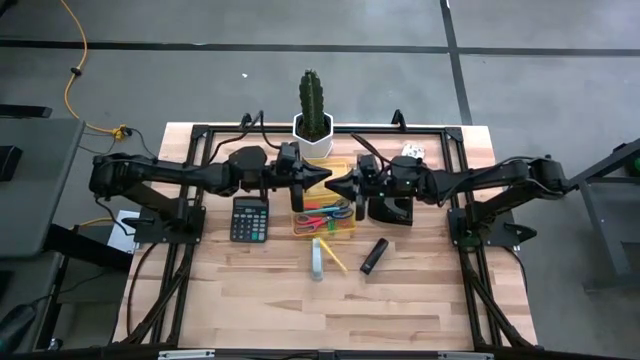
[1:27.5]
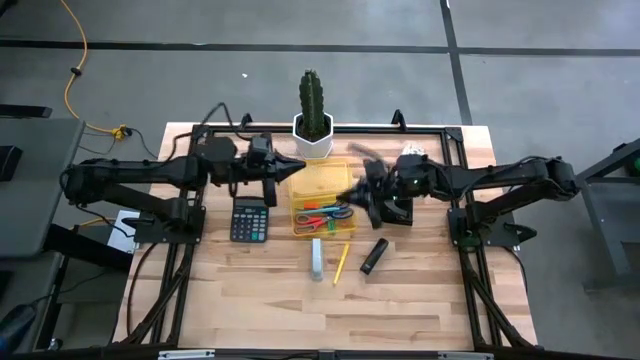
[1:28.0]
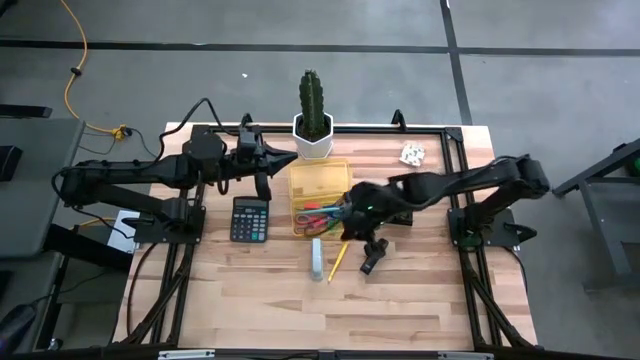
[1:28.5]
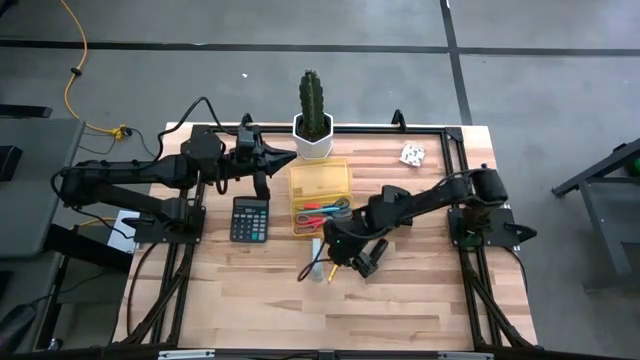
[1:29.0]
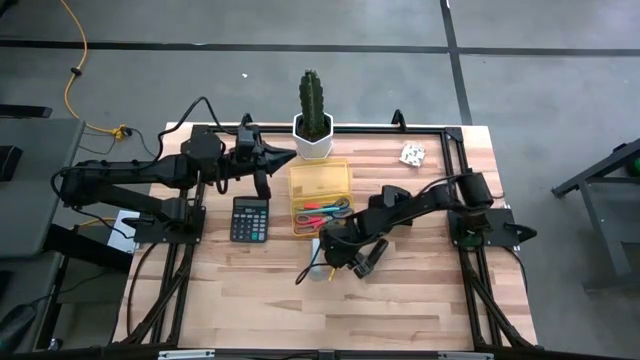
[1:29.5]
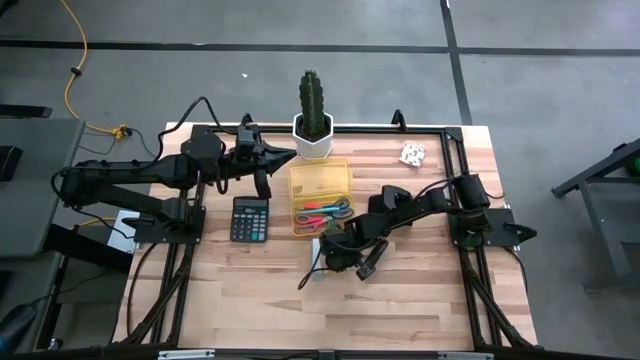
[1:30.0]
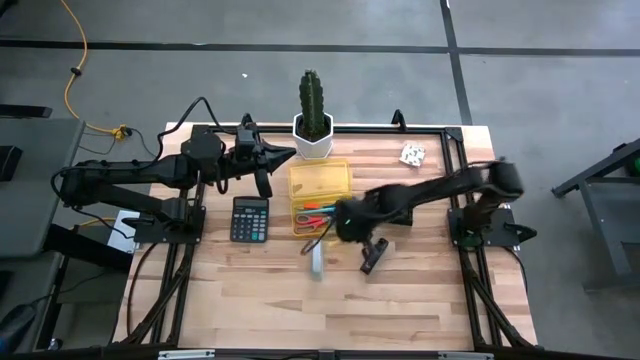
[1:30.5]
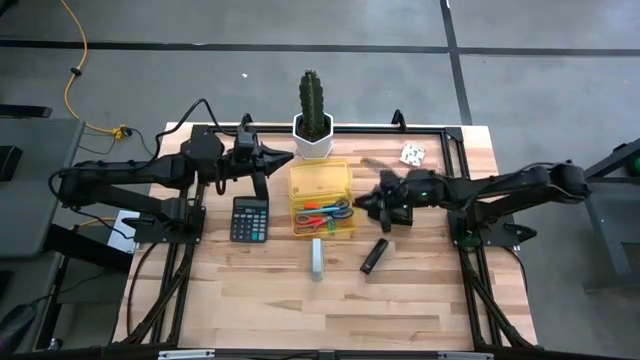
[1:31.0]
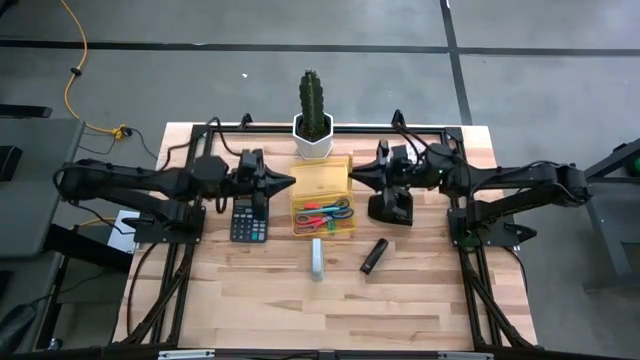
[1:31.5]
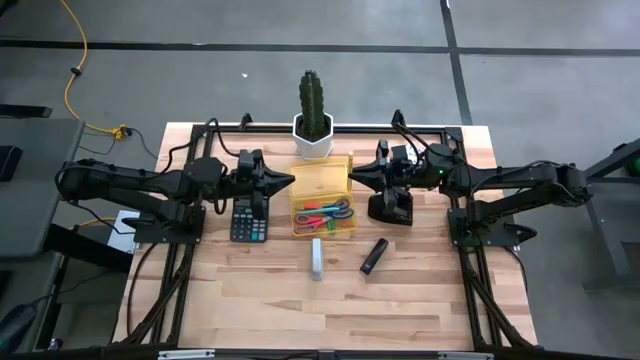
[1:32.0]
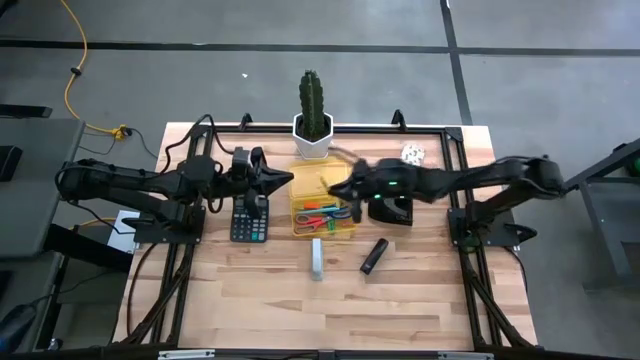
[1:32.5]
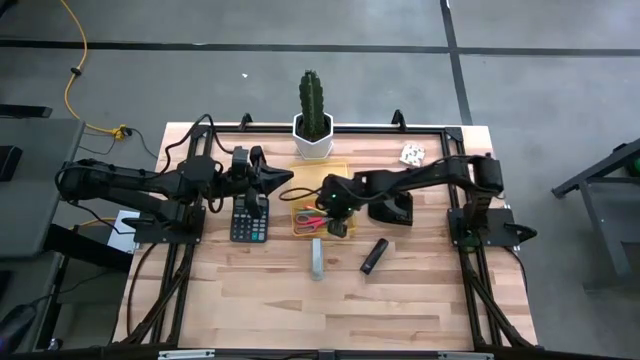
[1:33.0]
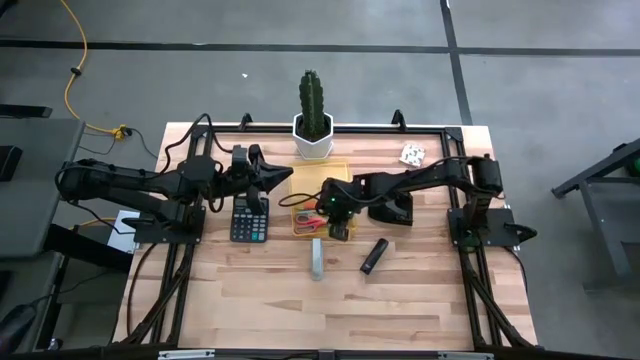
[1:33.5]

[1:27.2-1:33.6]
Task: Pick & place school supplies into a supply box
Put the yellow pen into the yellow supply box

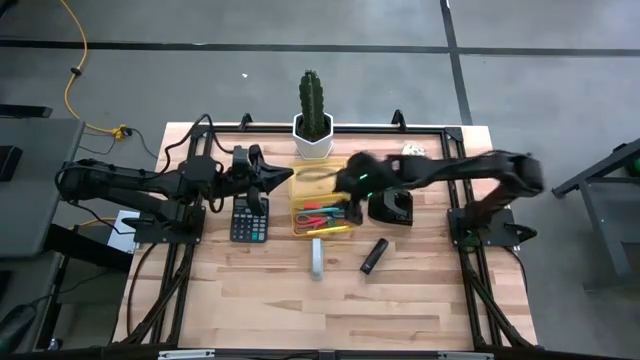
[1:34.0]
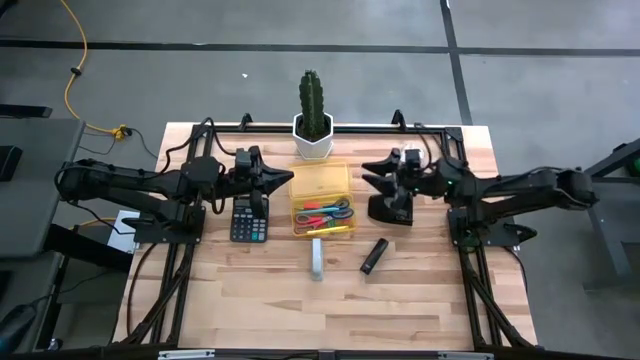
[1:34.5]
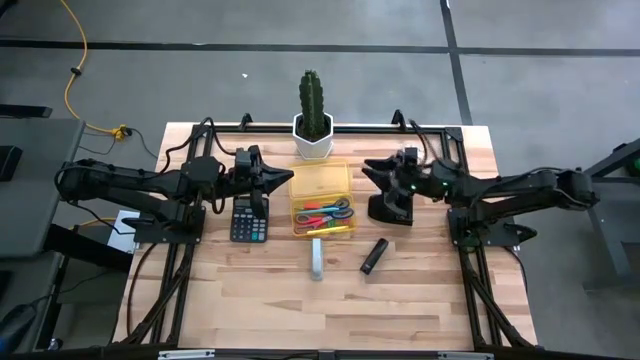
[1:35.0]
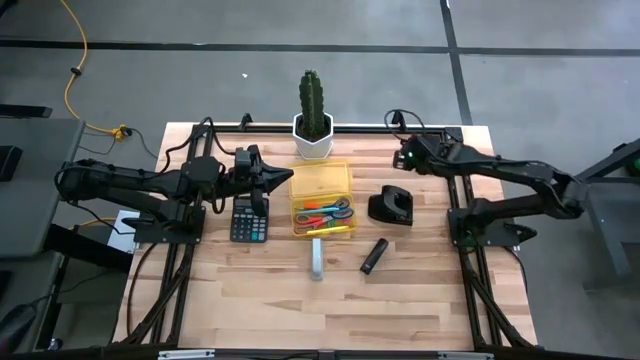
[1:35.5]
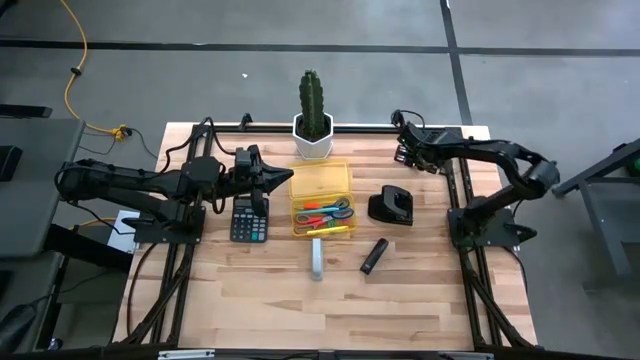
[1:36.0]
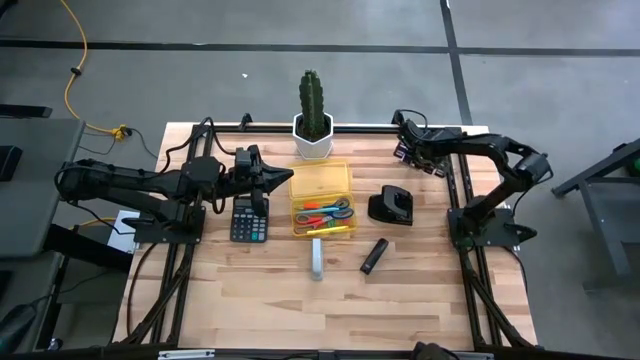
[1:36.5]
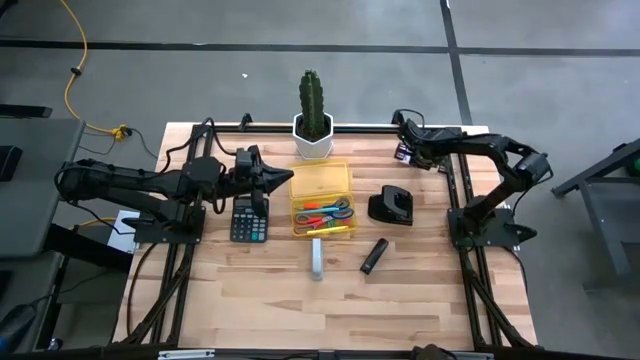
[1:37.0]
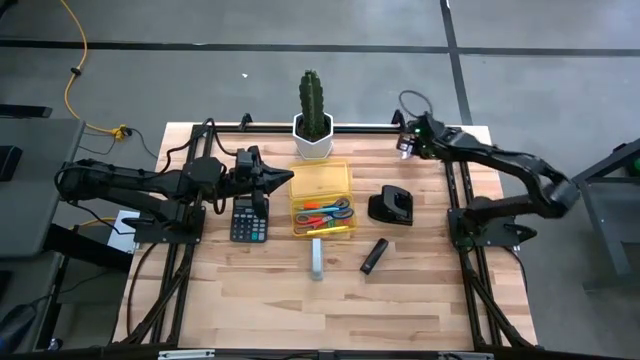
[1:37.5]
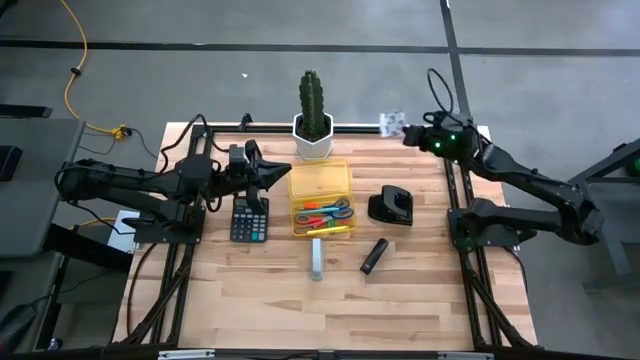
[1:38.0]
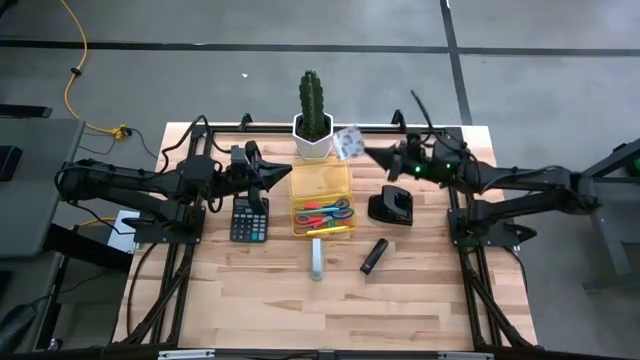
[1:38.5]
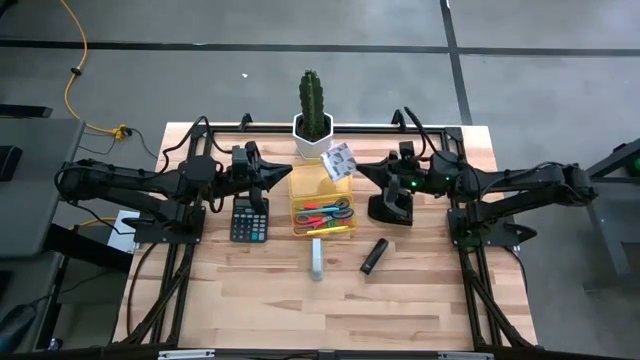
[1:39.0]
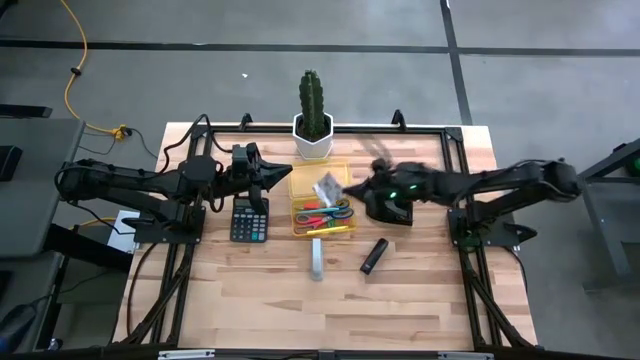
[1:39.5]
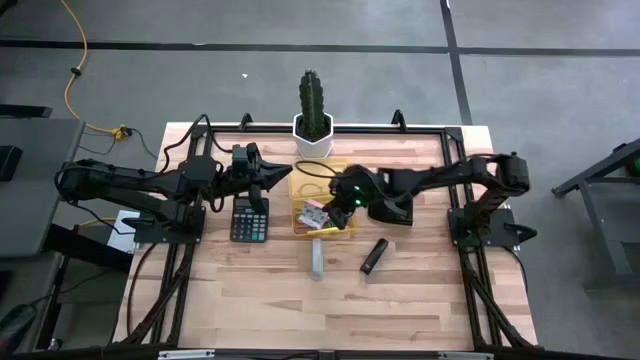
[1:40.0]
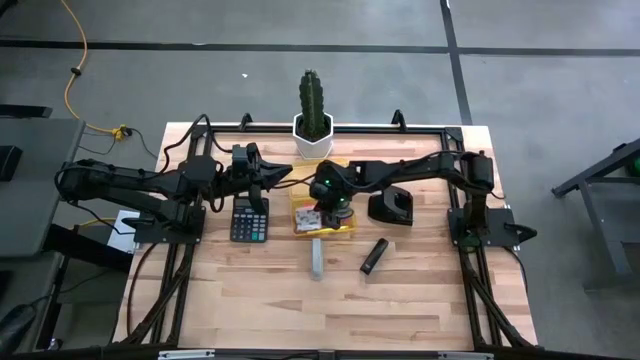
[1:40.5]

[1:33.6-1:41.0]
Put the sticky note into the yellow supply box

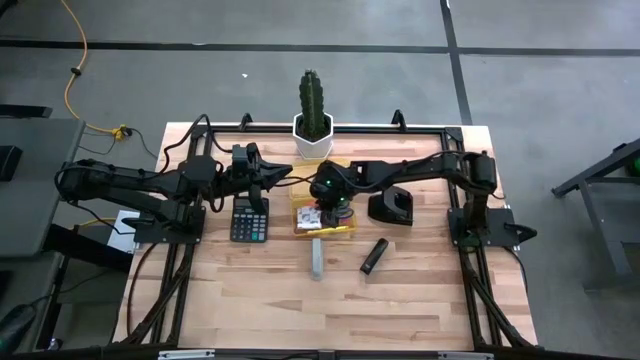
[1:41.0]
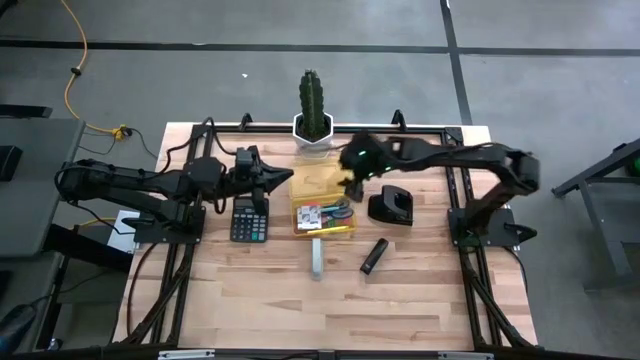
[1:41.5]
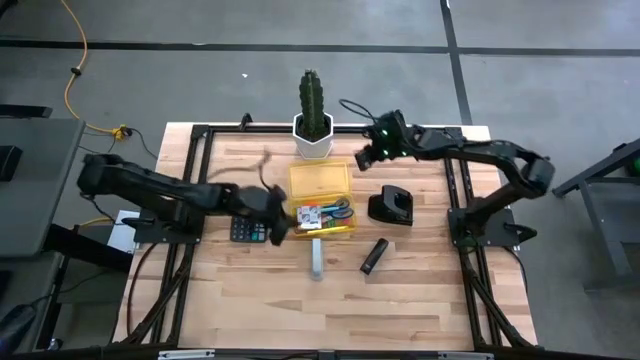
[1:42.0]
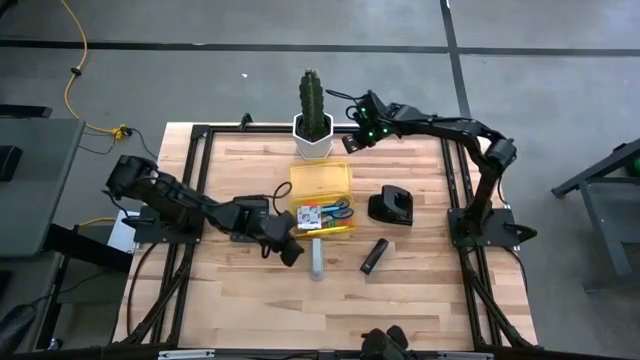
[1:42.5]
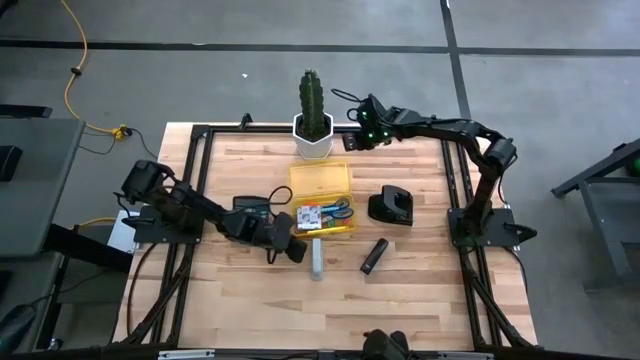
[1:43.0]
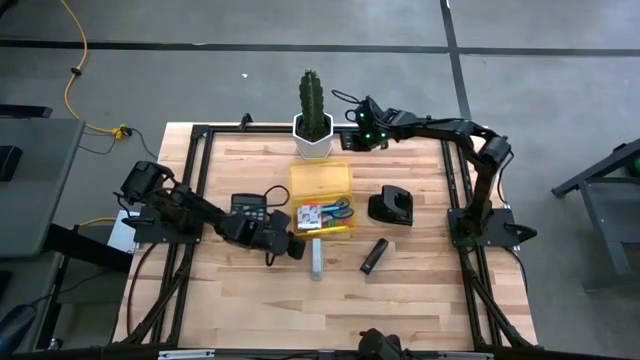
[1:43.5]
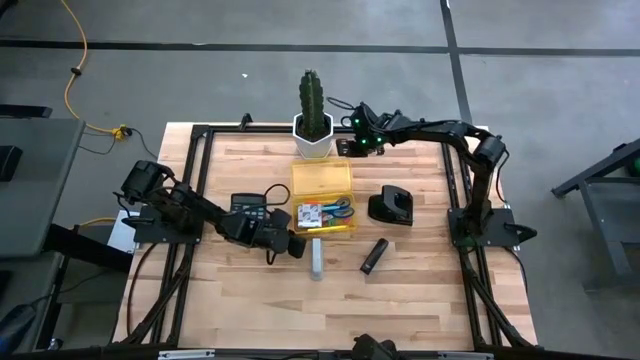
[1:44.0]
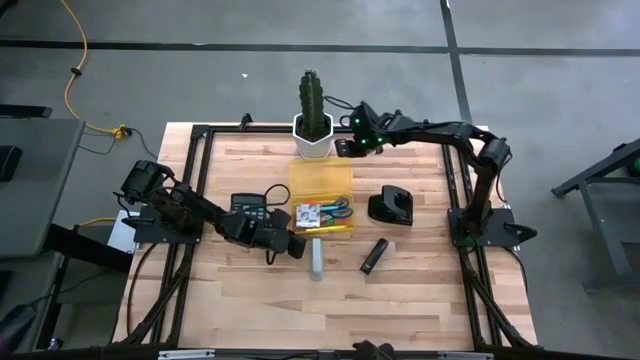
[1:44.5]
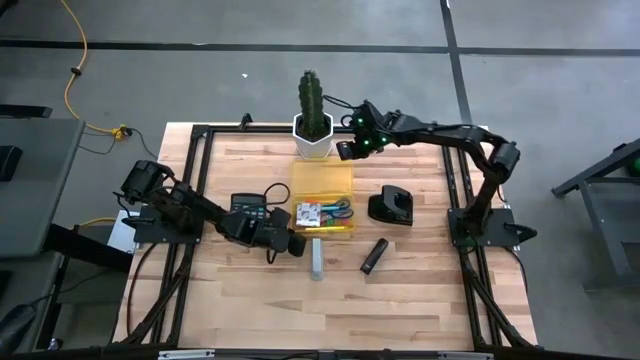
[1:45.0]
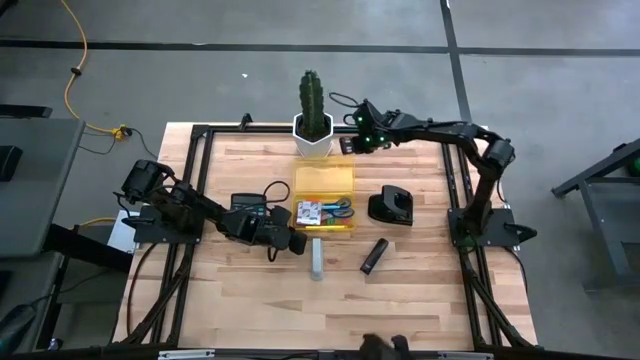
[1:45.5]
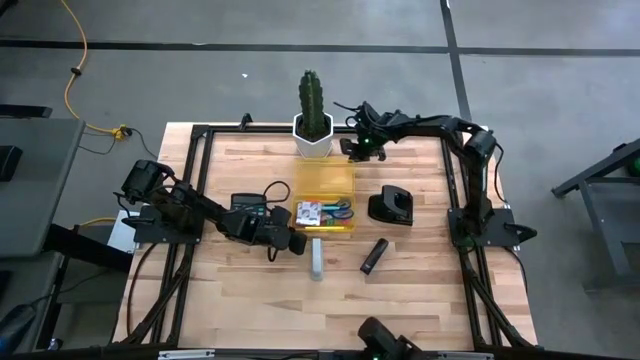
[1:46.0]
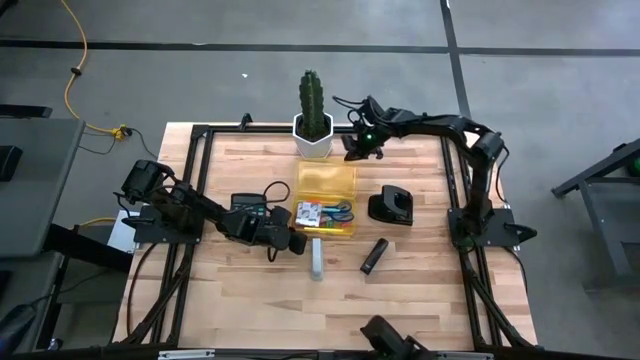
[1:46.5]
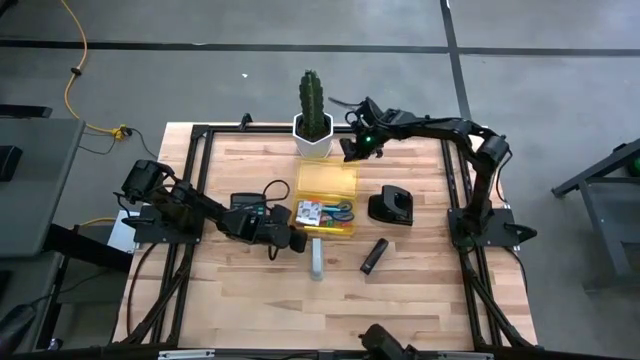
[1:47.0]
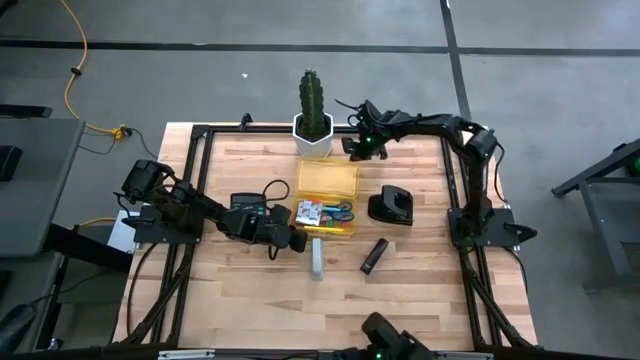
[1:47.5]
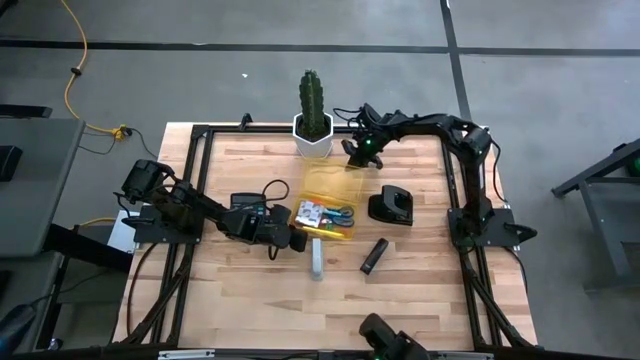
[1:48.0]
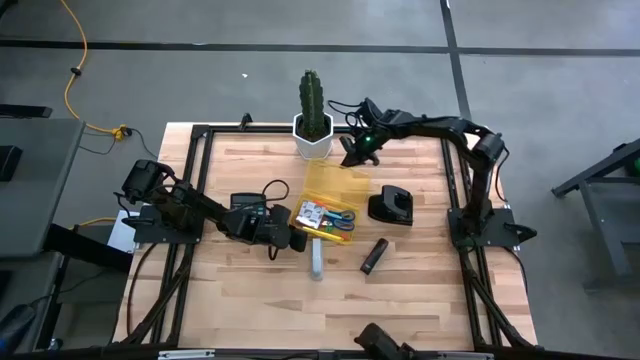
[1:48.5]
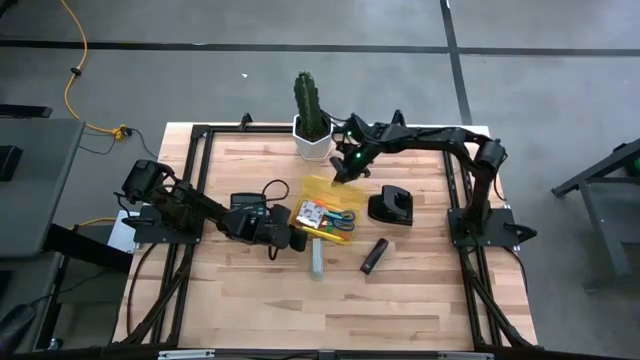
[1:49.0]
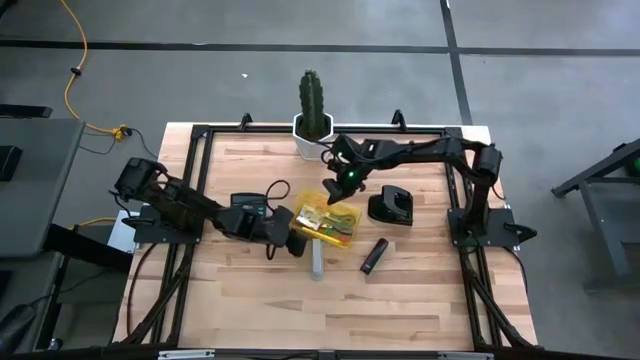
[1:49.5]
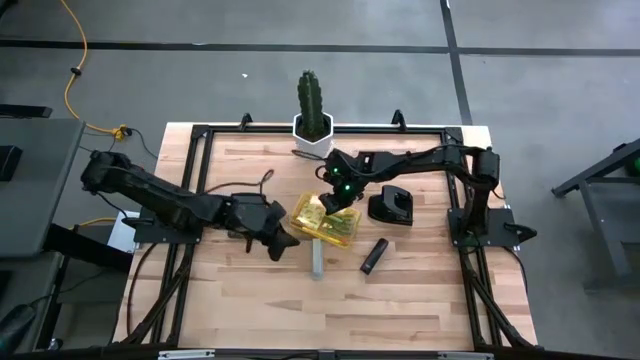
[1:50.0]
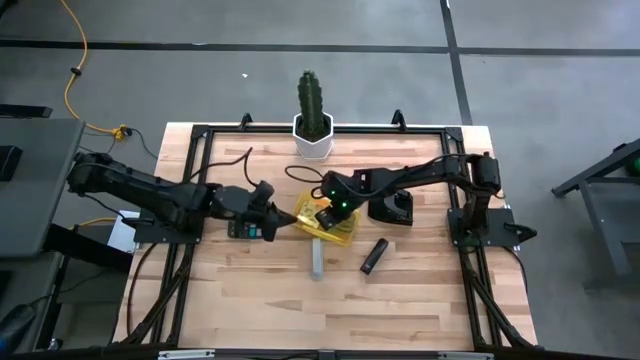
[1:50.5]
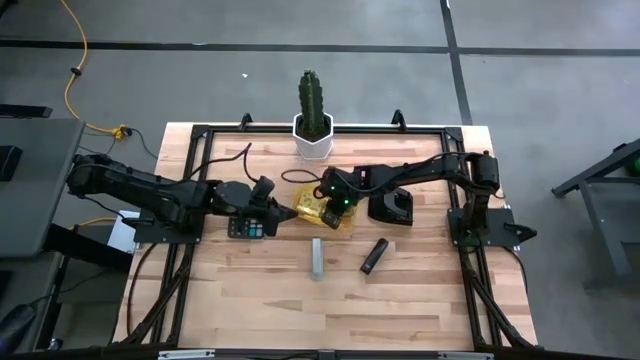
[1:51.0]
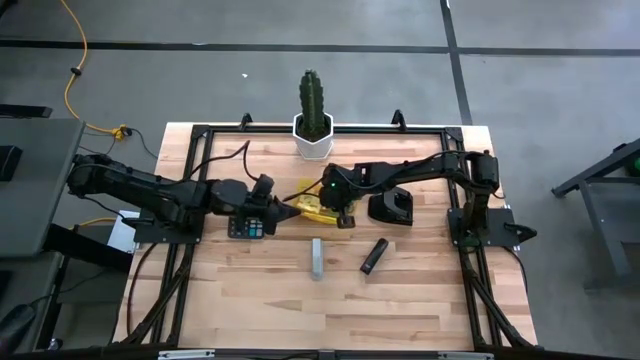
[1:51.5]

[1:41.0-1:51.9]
Close the supply box
